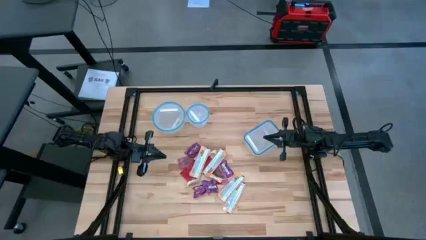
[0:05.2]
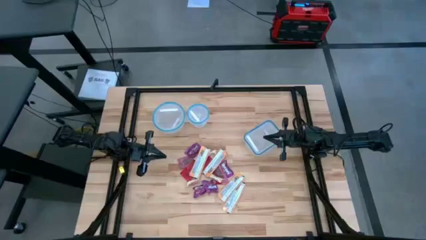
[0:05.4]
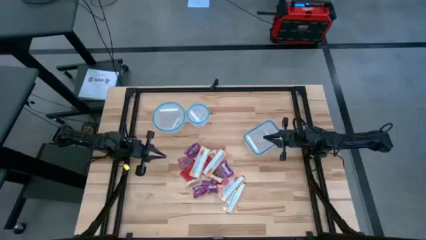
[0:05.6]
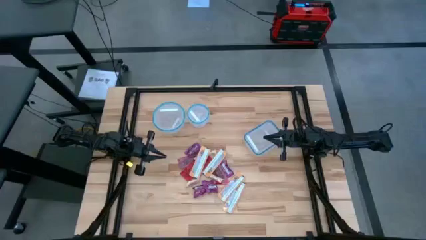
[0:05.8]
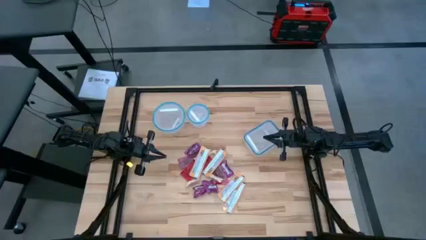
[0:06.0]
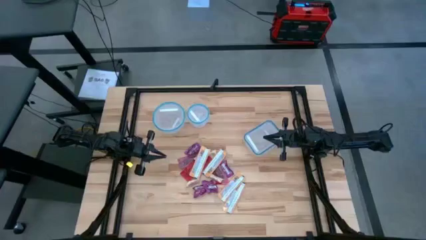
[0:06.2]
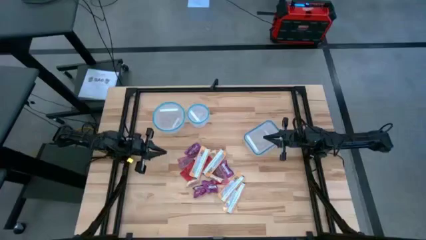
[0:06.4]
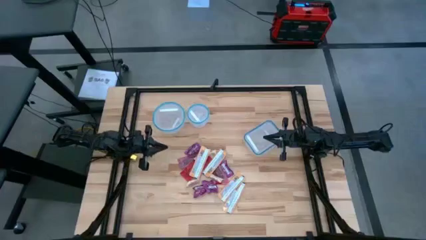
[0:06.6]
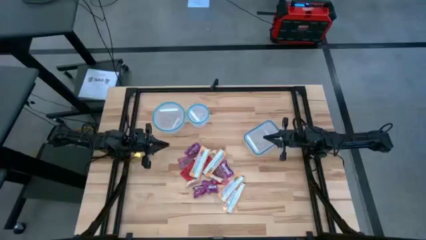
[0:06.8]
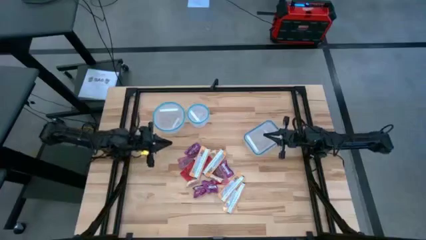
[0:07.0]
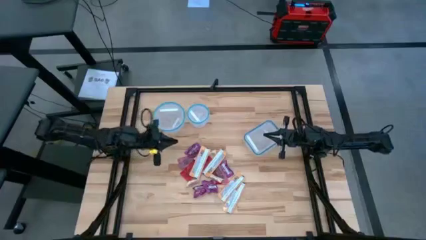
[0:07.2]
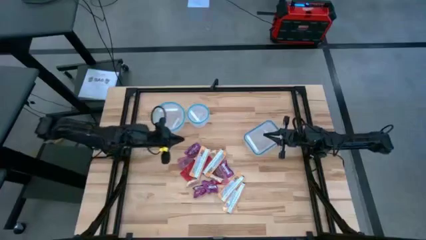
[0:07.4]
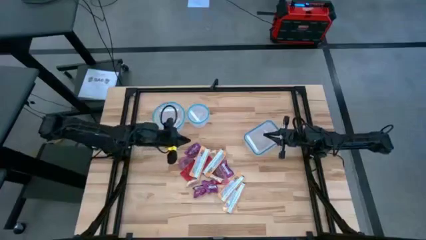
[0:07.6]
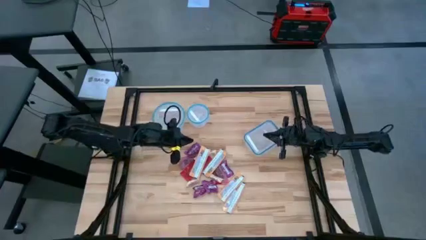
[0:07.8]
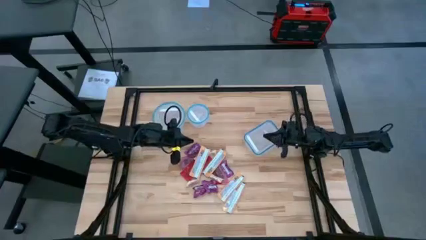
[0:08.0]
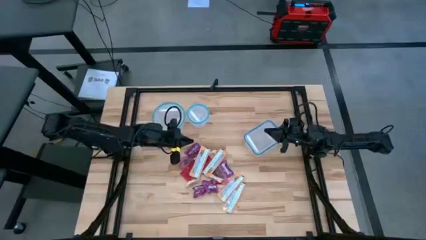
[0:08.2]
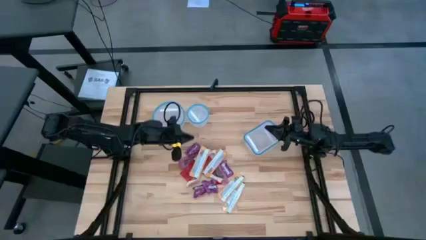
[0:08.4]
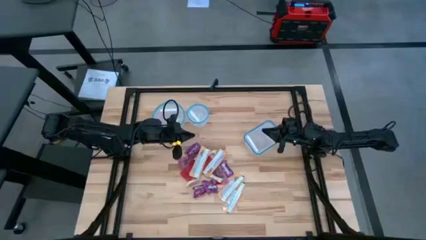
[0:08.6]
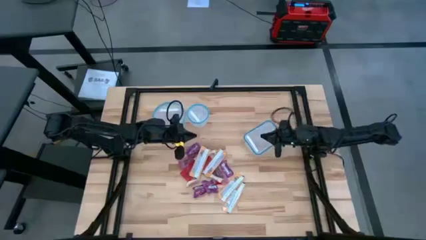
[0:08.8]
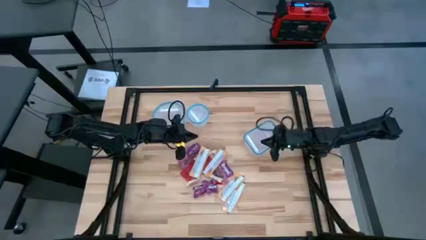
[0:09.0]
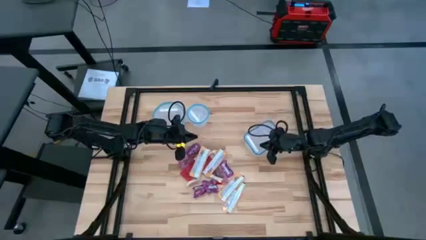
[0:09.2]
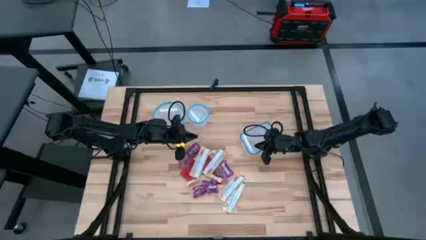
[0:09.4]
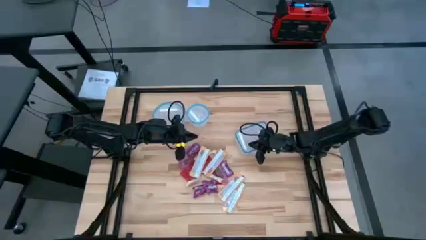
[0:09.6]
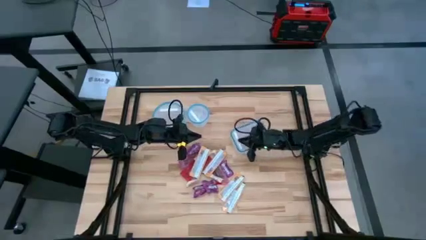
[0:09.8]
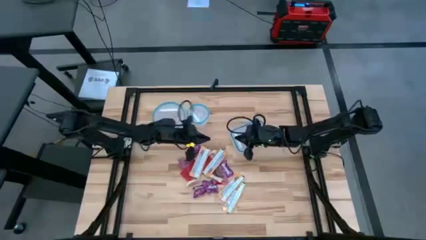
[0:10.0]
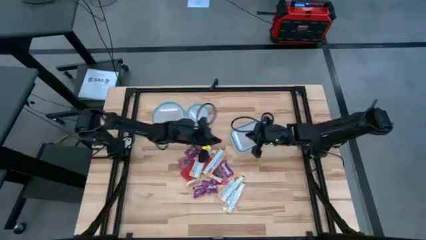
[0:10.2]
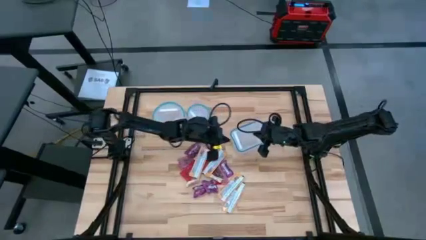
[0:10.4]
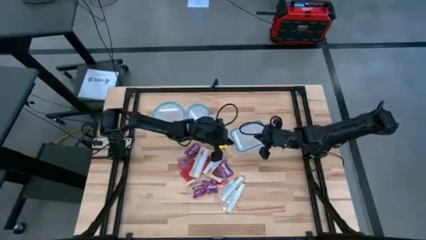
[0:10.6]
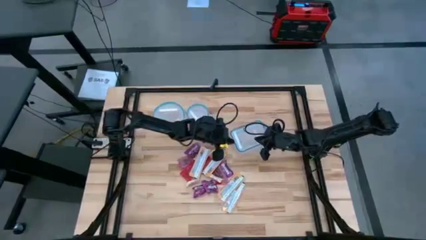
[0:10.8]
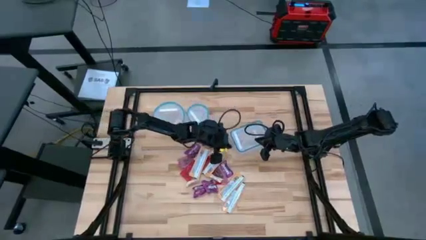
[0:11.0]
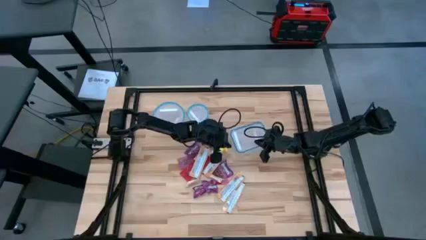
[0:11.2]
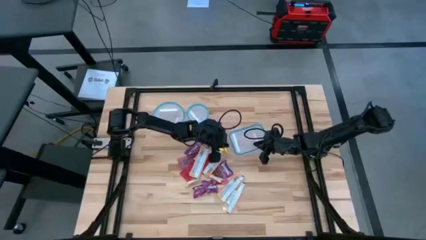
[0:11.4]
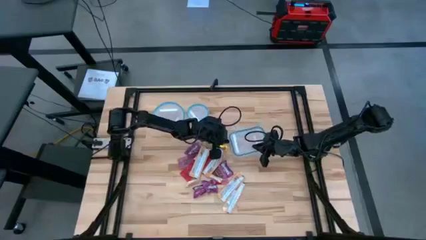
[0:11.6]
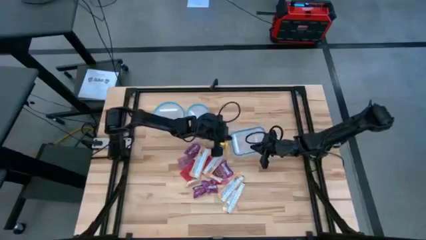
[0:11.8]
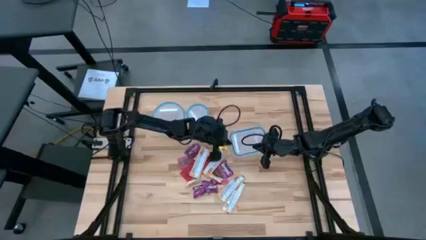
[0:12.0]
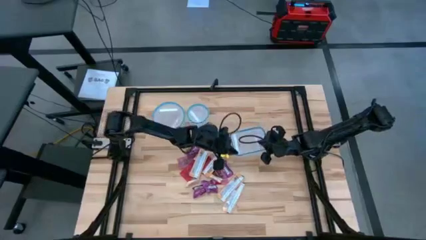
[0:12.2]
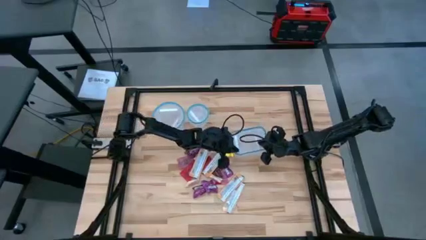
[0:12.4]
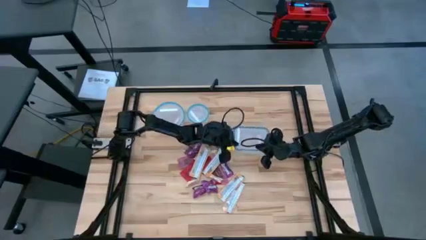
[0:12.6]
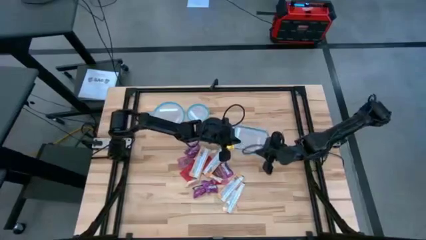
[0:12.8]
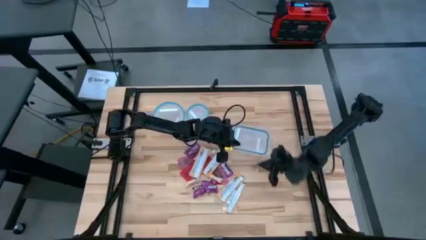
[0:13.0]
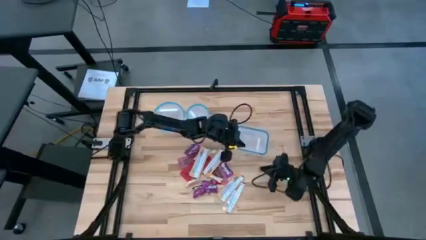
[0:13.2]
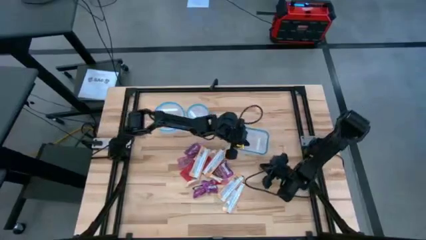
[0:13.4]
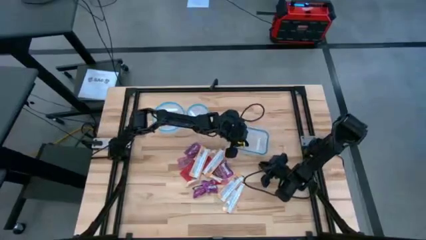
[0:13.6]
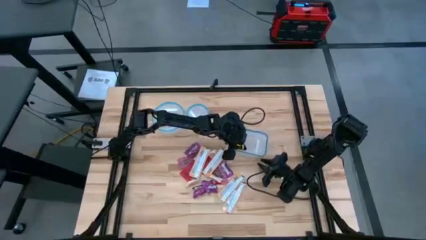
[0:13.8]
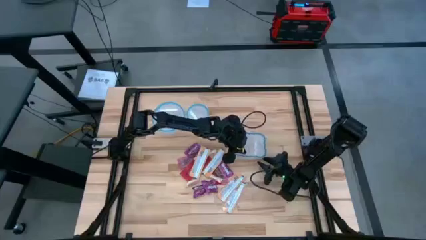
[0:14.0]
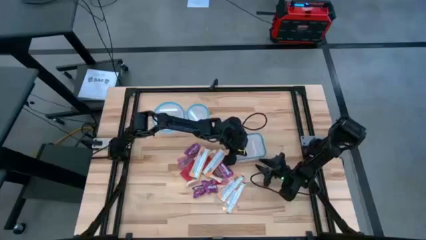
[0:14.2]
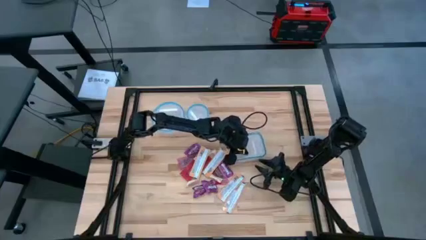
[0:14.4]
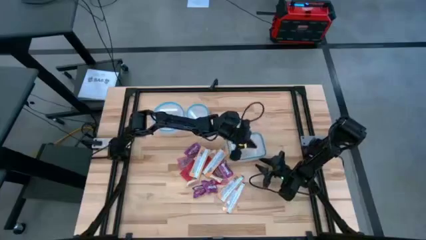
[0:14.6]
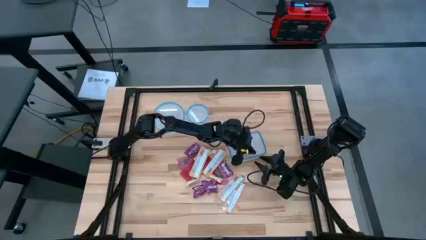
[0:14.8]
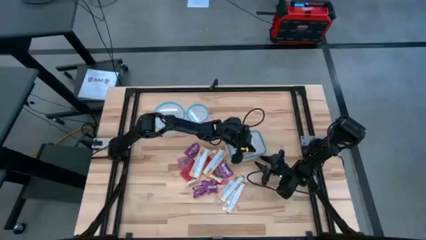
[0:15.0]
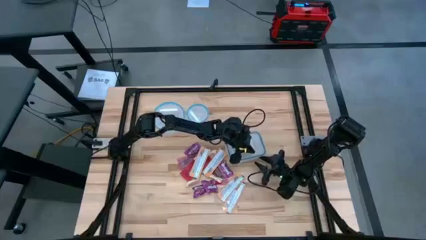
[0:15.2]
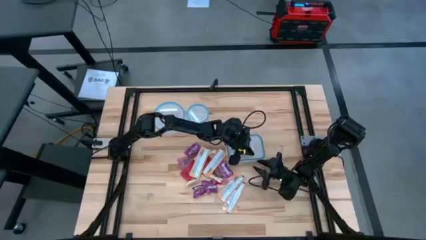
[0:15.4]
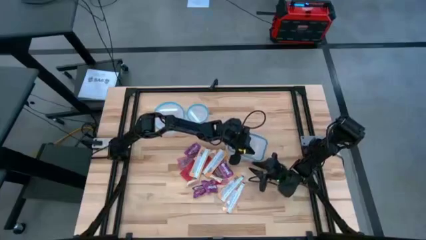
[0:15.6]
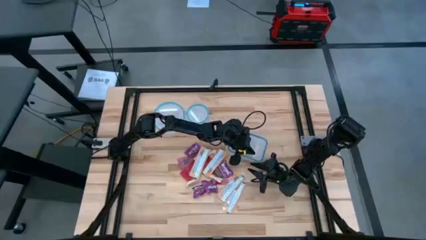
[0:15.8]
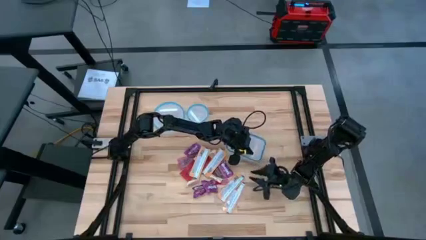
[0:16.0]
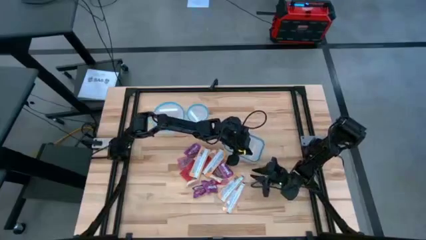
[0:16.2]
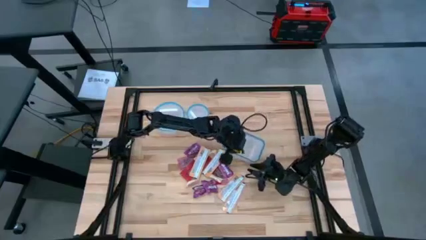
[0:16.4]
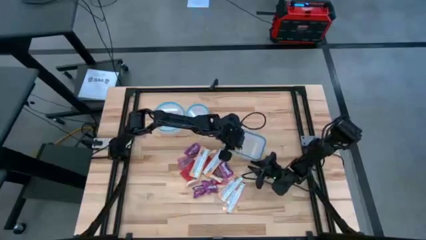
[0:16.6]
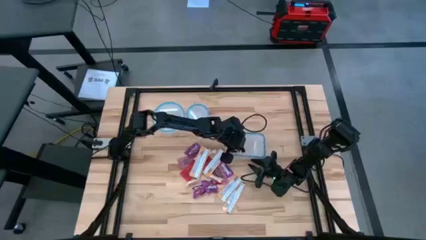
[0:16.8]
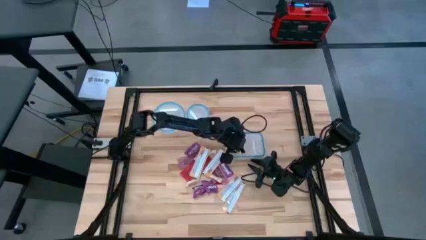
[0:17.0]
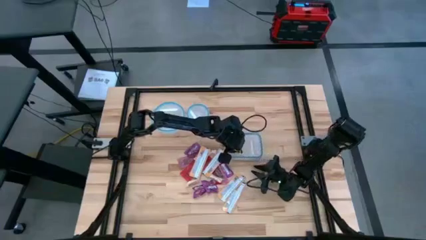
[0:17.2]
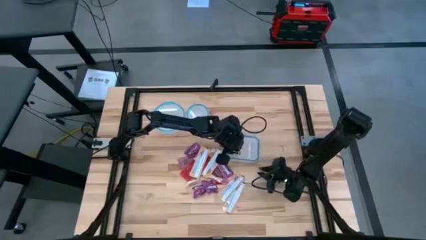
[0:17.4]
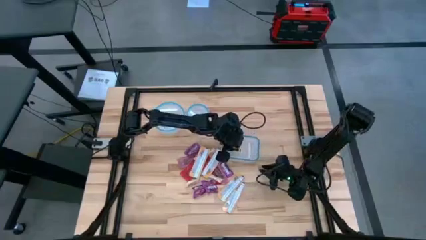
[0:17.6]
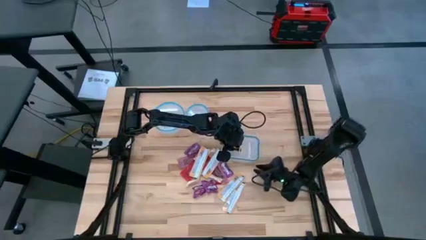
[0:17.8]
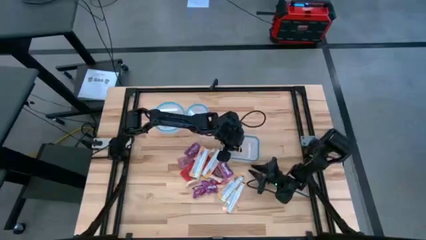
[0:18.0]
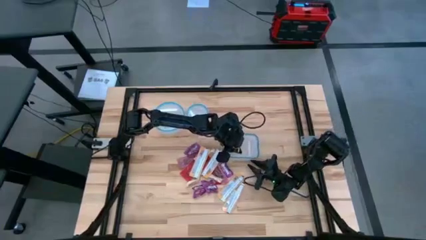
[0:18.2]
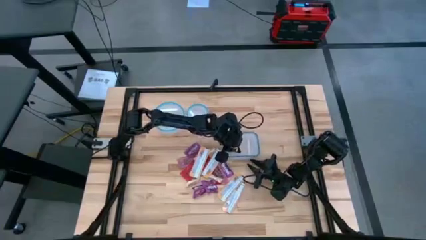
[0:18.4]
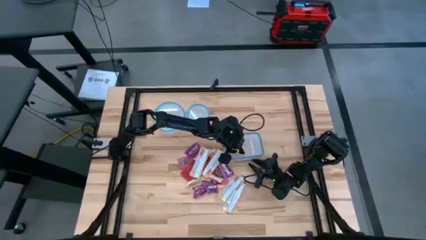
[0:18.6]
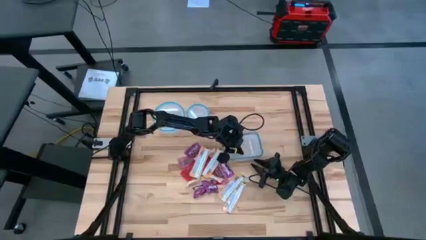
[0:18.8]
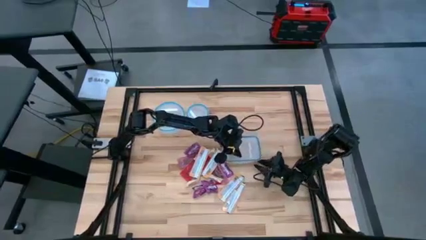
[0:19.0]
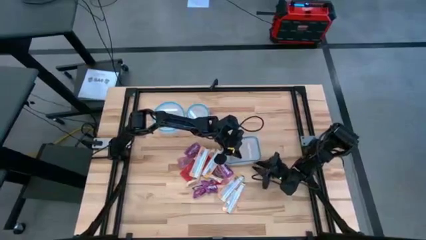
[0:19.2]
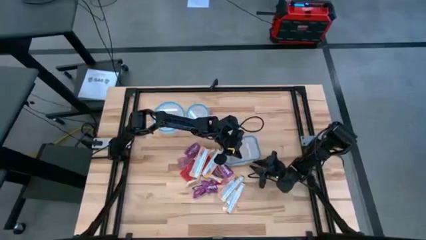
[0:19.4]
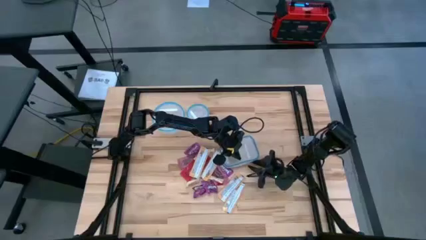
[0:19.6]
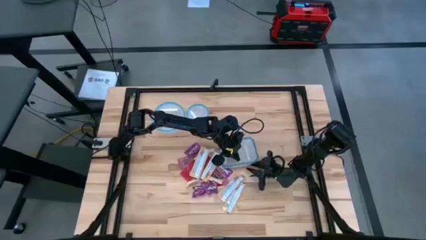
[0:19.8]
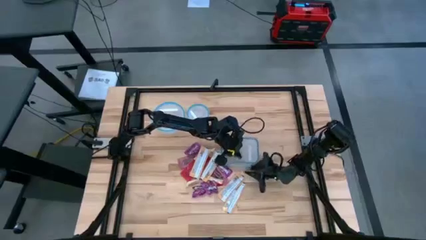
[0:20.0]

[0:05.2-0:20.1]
Task: Sort candy
Open the rectangular transparent bin
